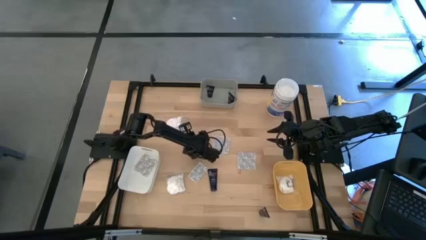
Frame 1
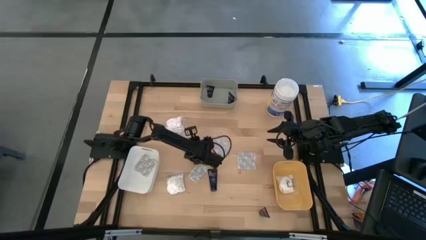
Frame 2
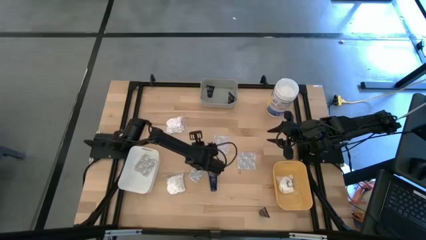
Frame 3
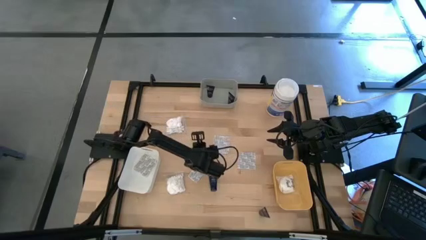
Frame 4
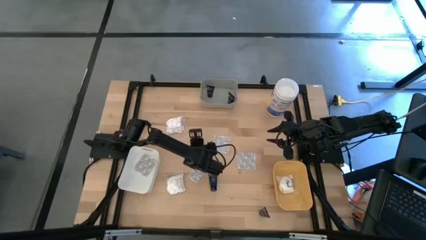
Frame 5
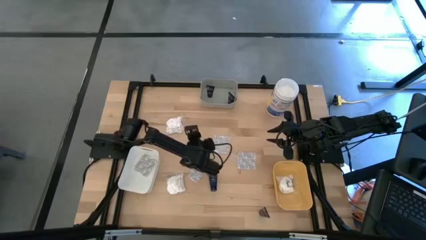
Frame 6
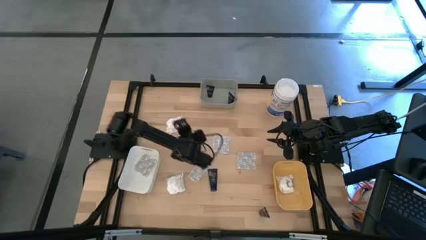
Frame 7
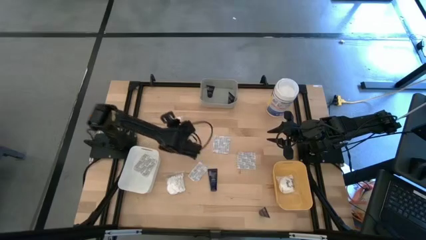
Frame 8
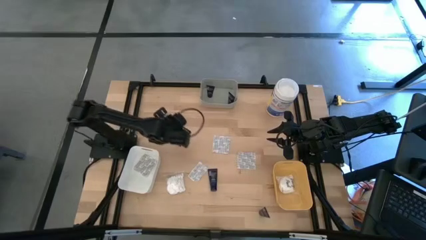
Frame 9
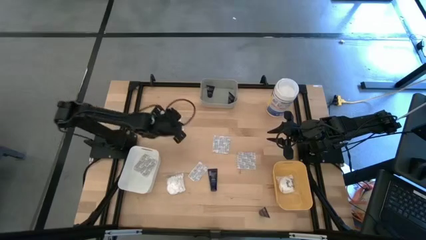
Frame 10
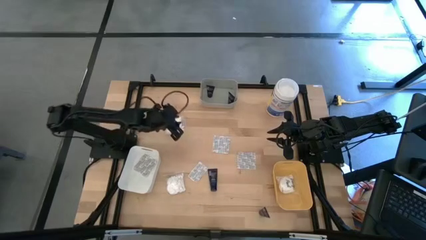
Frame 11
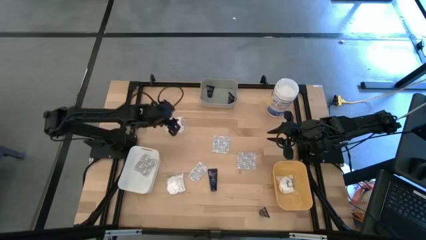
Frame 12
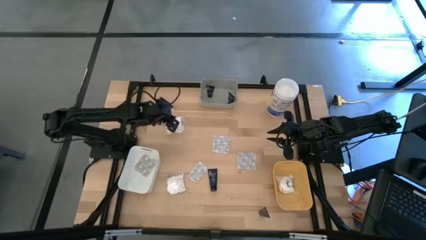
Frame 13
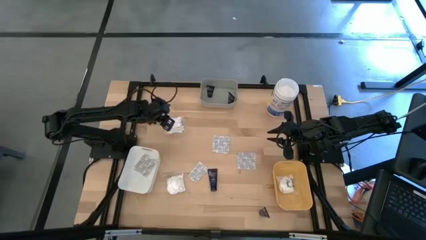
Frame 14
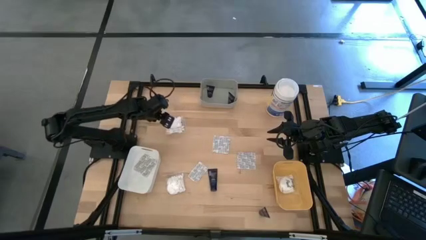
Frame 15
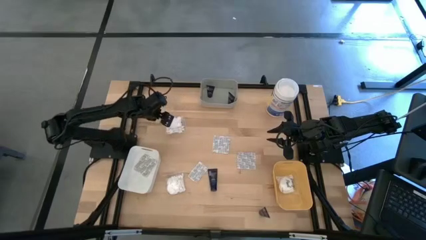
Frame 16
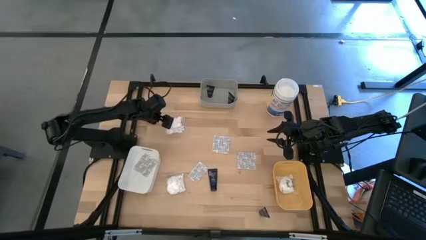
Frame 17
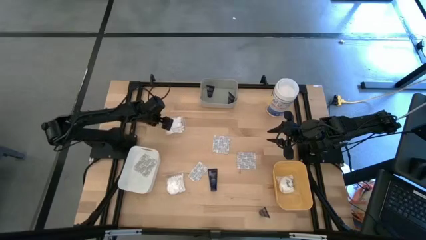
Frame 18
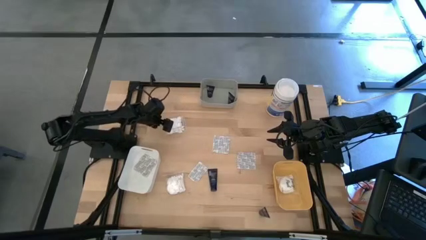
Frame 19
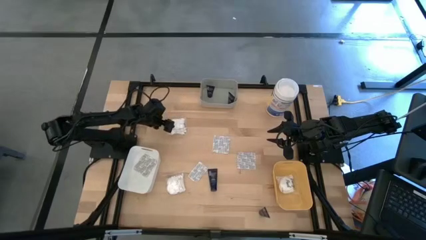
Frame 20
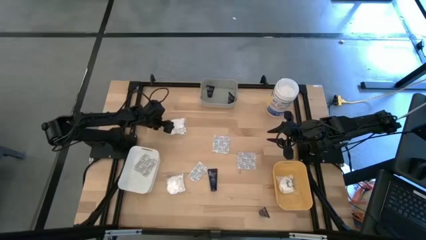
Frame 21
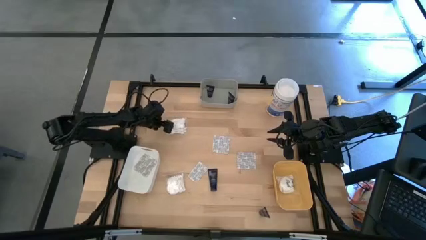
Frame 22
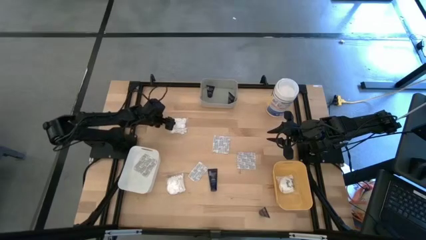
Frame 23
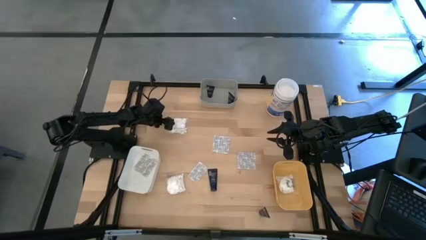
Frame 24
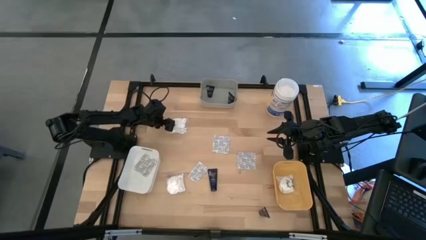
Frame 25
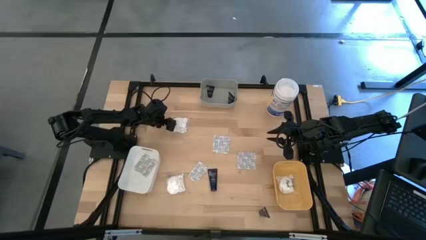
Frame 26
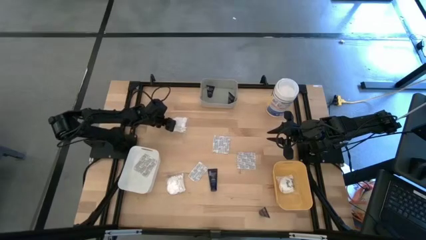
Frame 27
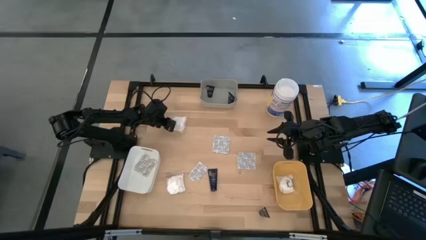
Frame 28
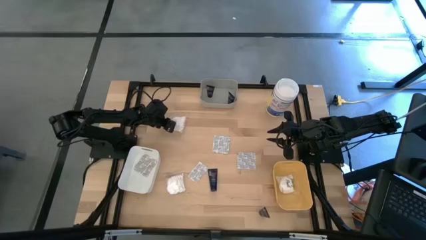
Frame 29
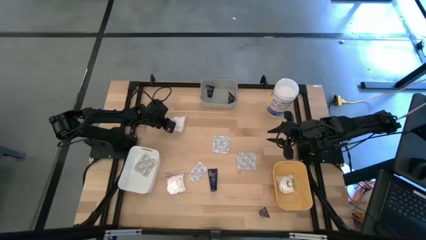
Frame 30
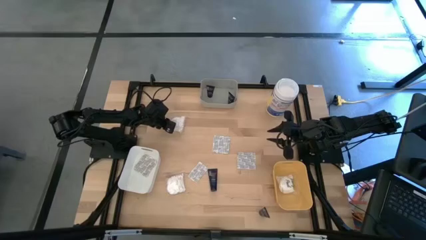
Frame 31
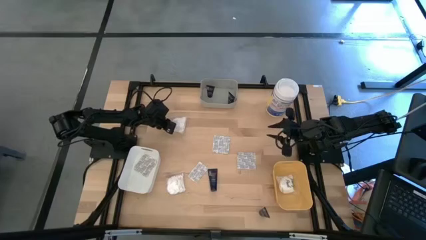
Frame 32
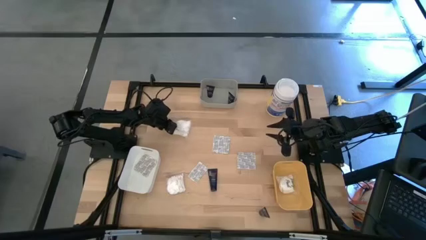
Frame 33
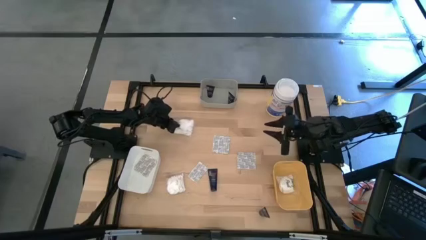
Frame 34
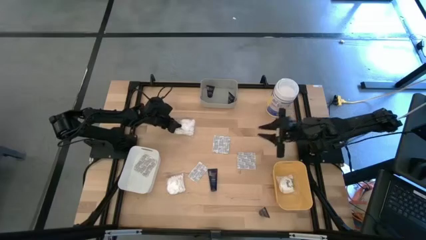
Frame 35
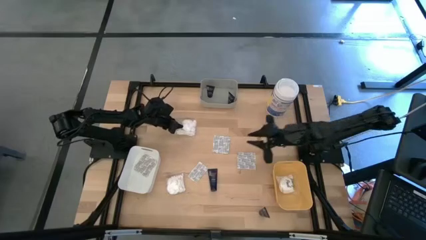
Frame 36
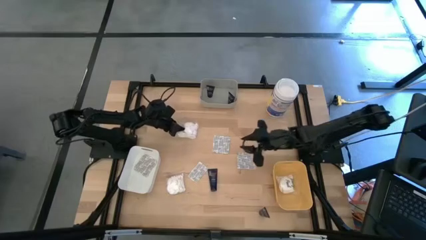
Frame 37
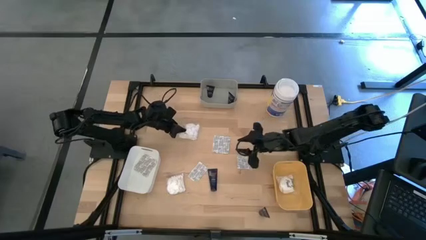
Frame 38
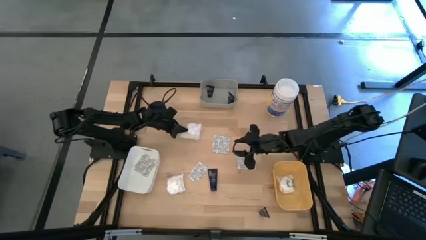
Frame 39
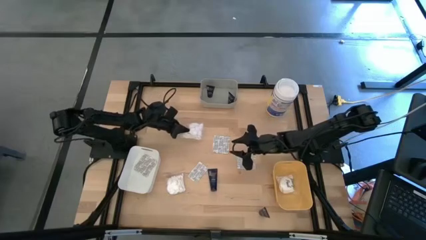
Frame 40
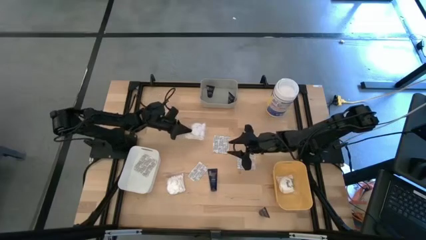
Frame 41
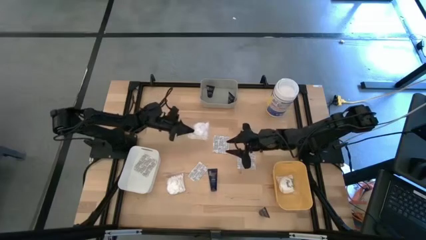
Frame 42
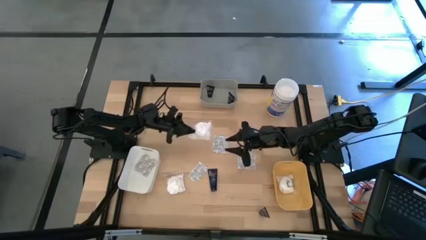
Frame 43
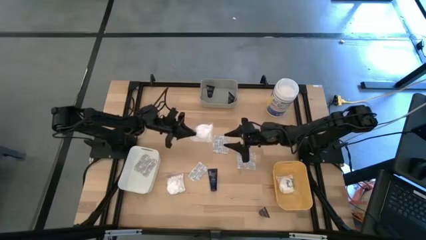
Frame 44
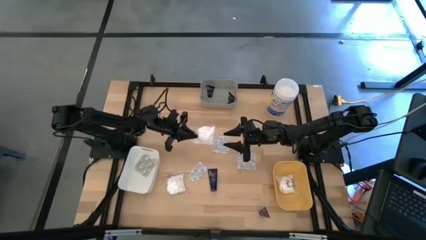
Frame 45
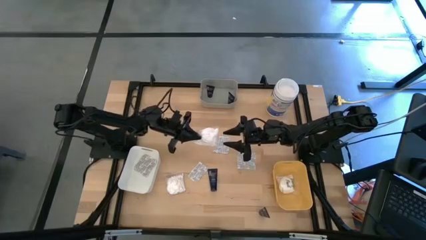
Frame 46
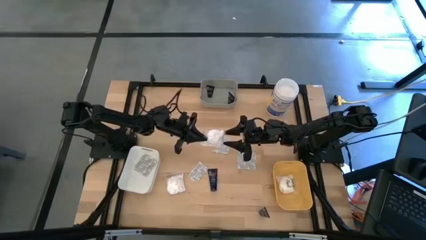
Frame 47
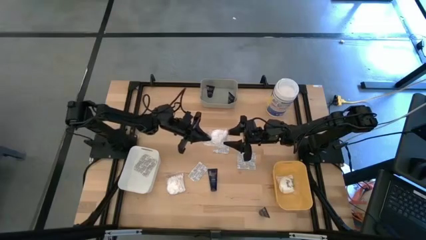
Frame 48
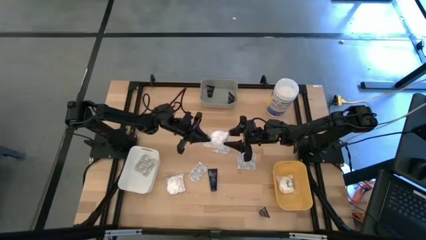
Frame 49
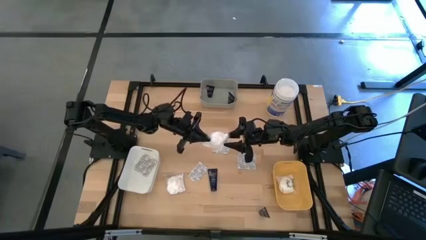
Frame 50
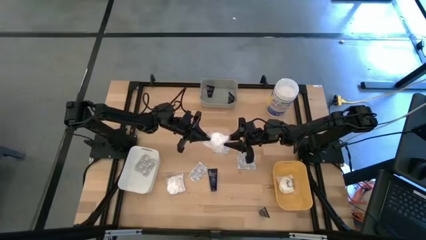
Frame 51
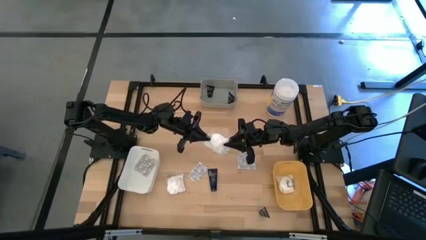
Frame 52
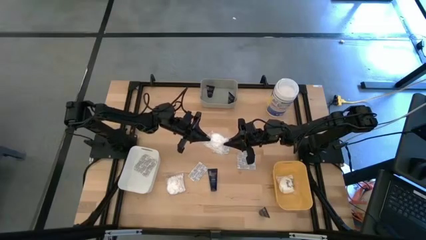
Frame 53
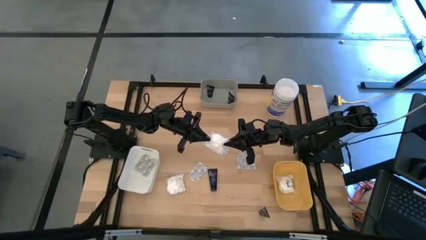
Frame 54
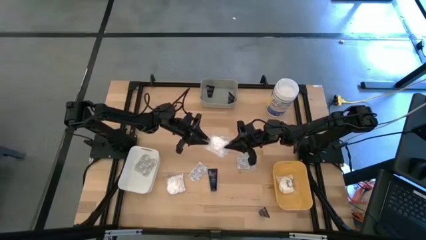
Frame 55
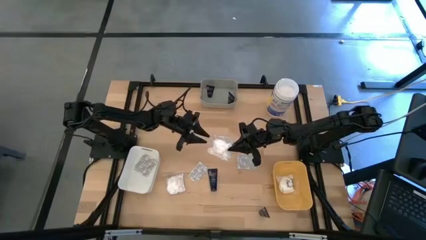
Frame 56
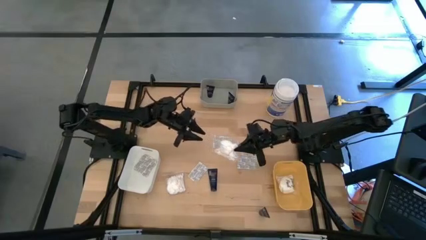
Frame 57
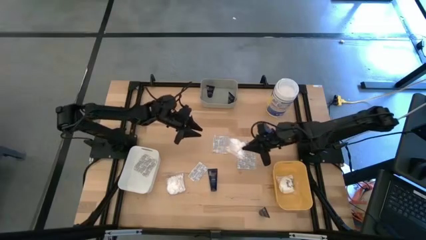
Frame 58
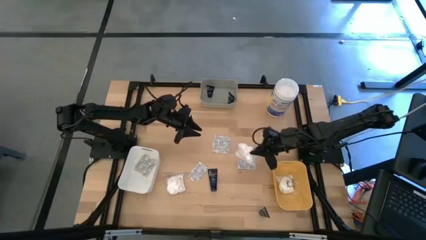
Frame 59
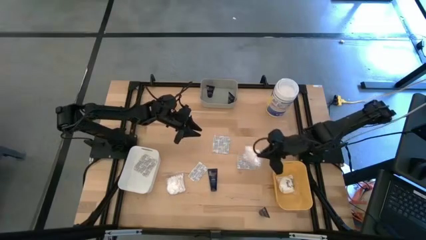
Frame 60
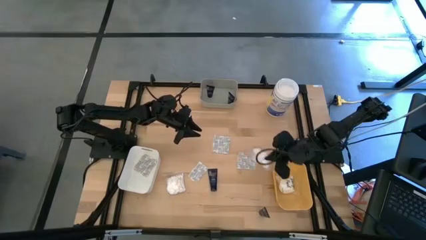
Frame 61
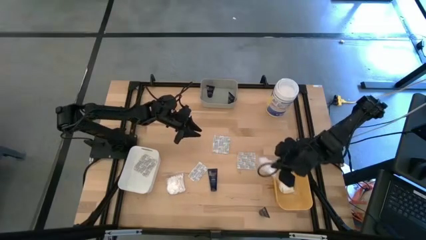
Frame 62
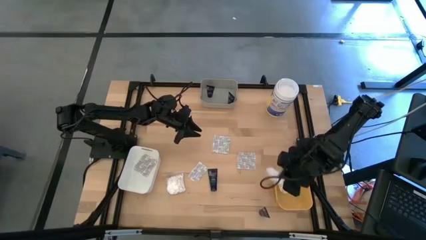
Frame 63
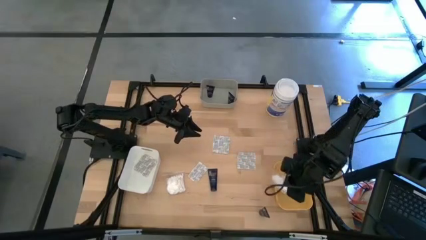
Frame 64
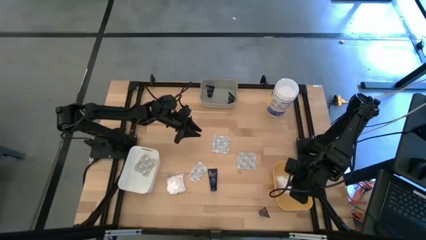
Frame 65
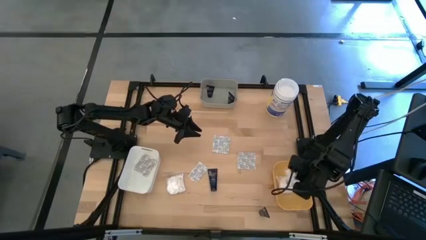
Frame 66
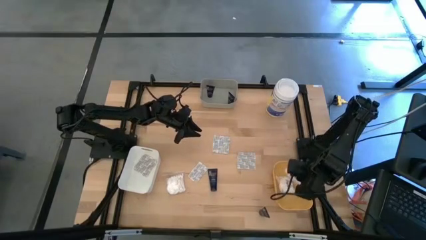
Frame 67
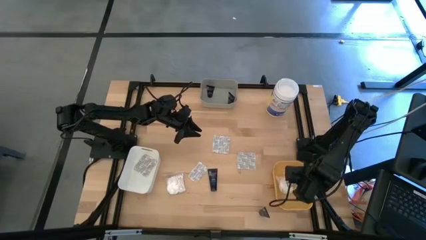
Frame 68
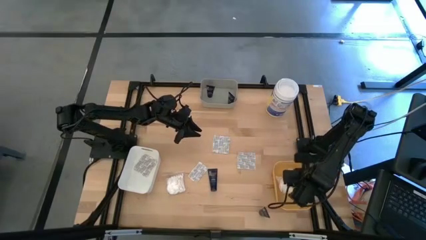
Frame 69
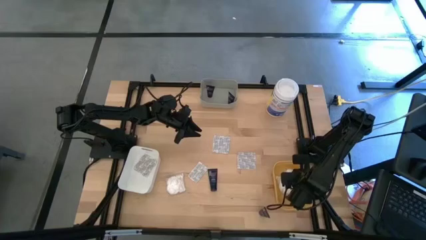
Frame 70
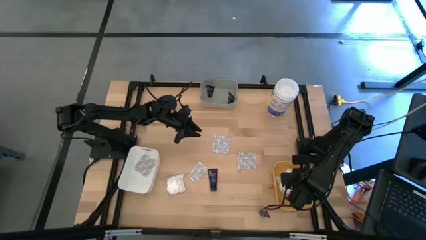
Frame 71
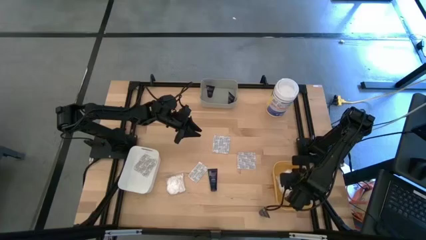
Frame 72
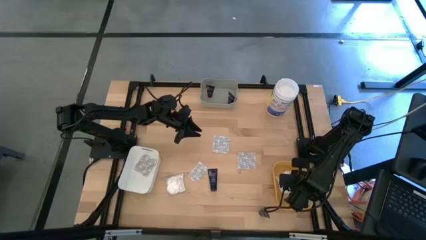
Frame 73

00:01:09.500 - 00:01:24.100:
Task: Pick & Place Travel size toiletries
Put the top cotton pack into the yellow bin

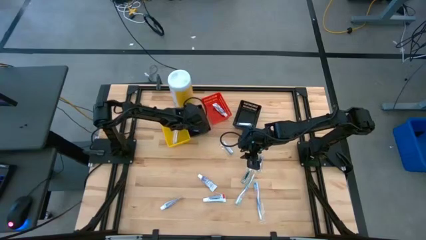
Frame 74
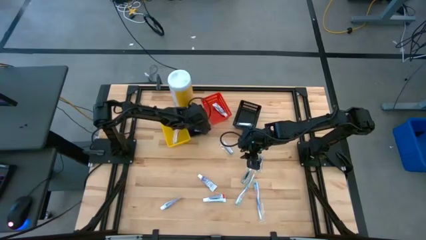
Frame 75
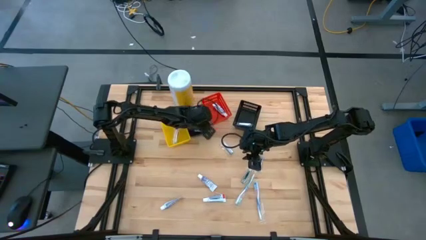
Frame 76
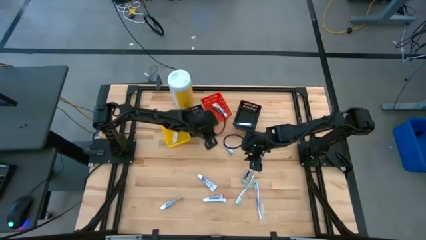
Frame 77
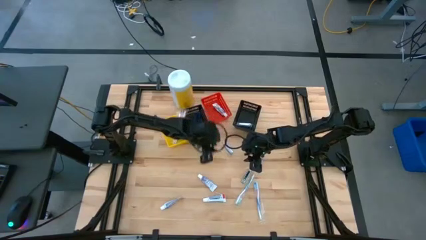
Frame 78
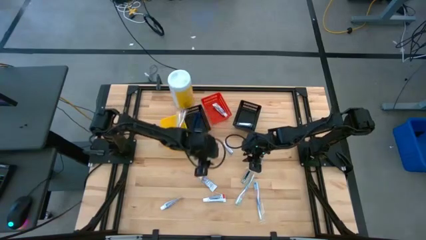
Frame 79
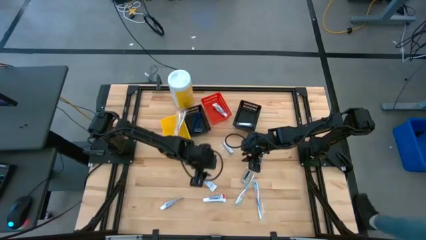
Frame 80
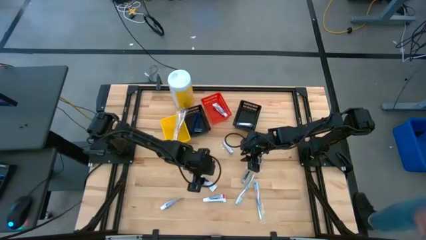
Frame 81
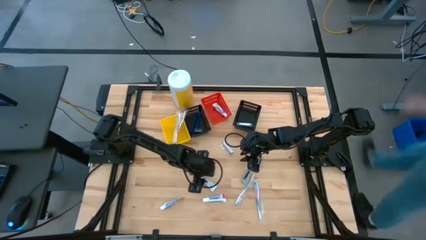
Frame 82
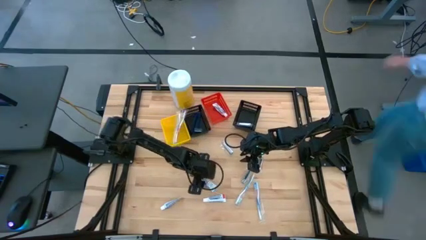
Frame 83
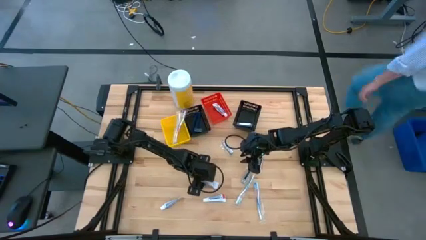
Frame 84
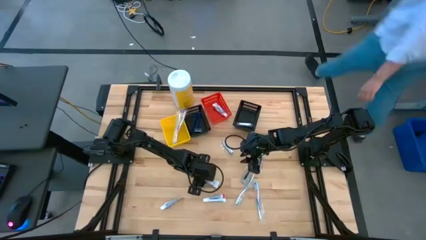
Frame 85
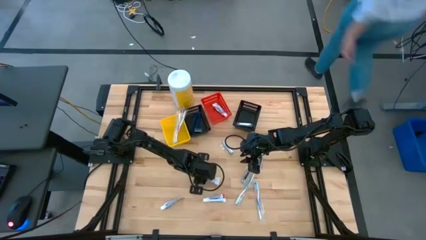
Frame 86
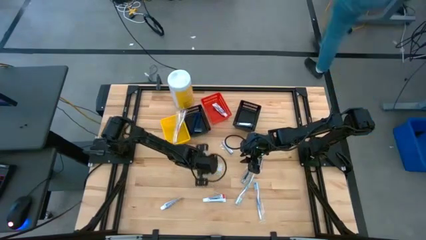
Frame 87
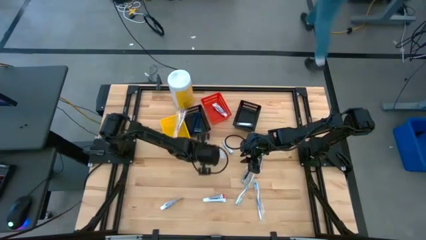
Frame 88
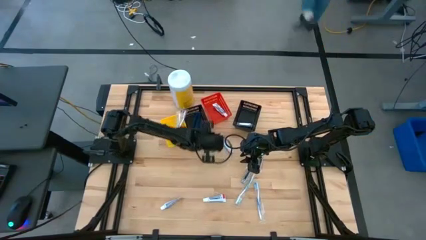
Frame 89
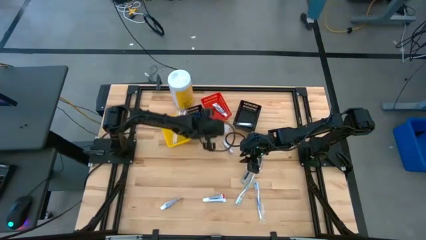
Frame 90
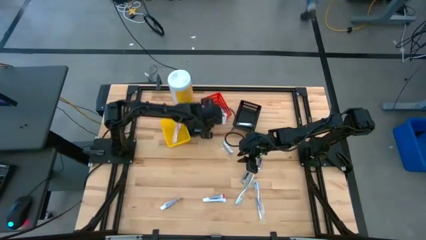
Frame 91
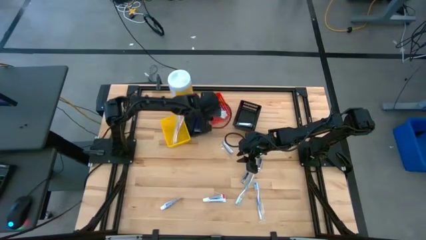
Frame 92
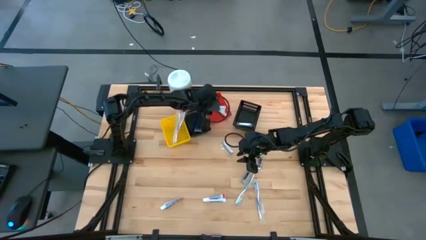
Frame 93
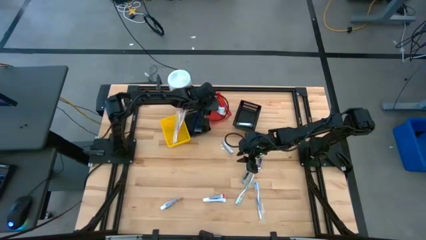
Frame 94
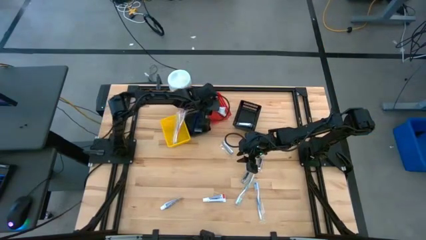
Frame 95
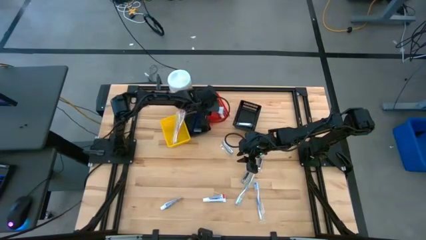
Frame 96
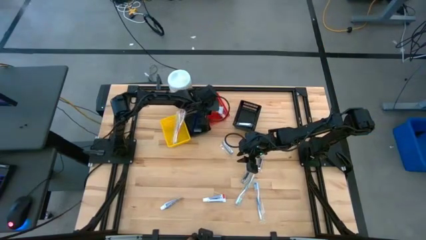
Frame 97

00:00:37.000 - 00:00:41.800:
Task: Pick & Place Travel size toiletries
Put the white toothpaste into the red bin
